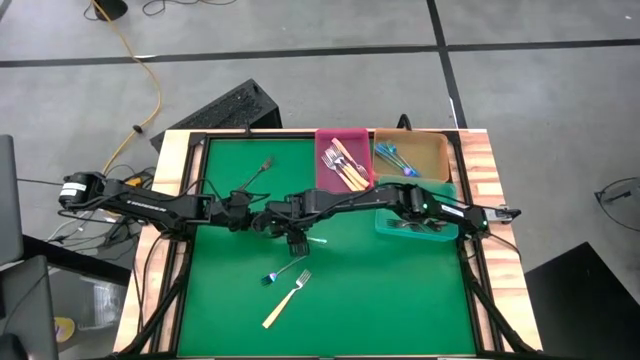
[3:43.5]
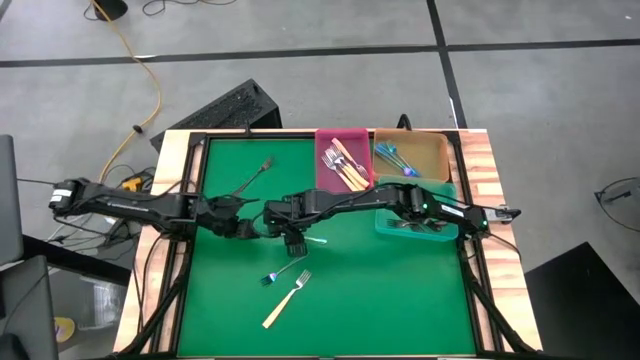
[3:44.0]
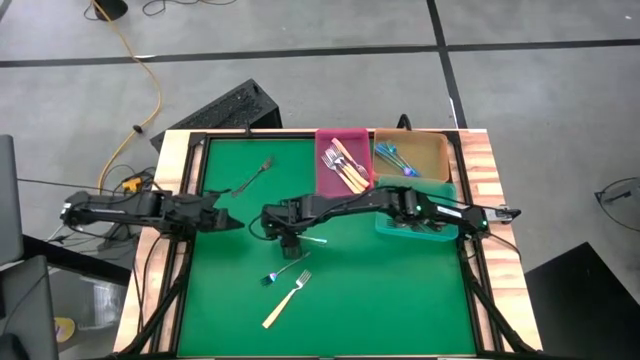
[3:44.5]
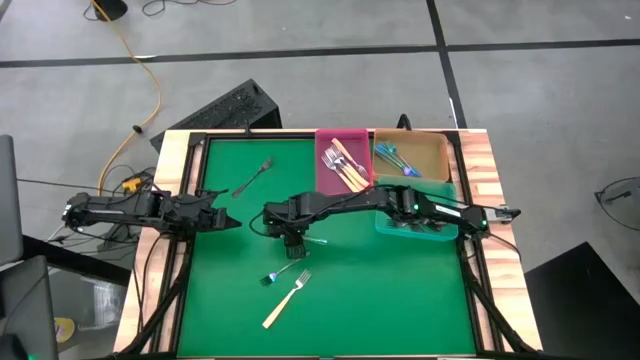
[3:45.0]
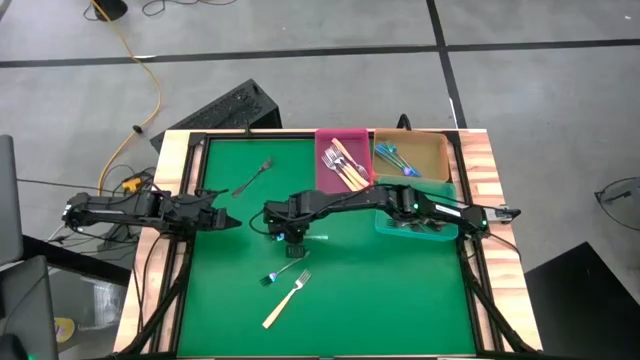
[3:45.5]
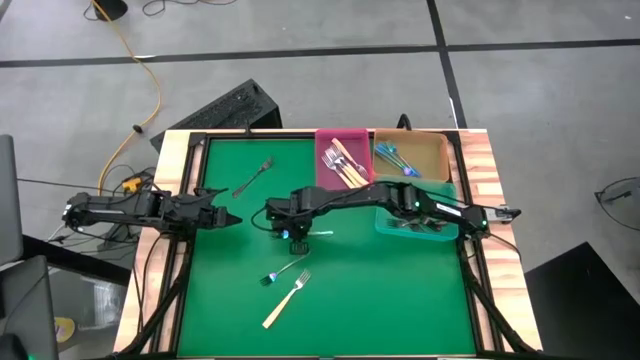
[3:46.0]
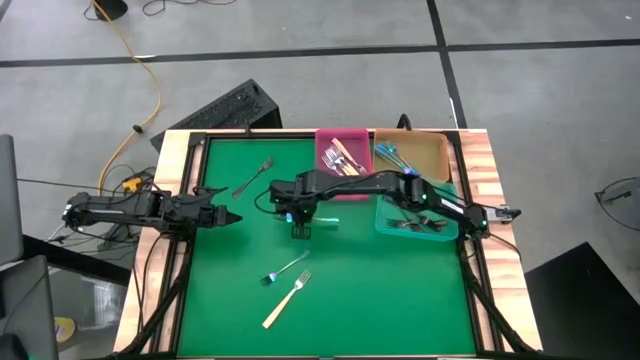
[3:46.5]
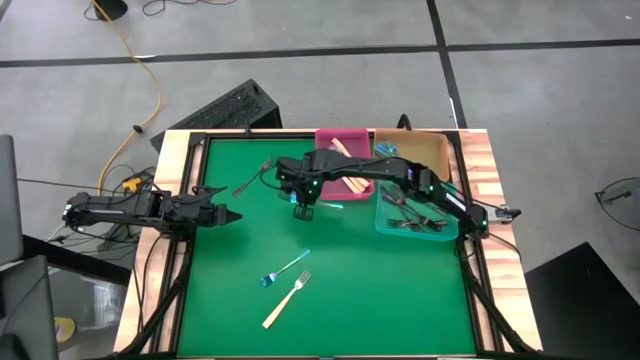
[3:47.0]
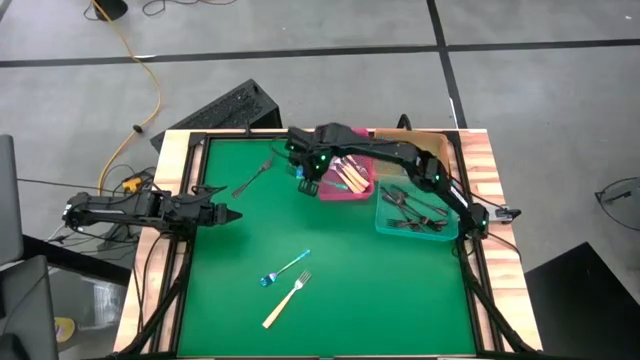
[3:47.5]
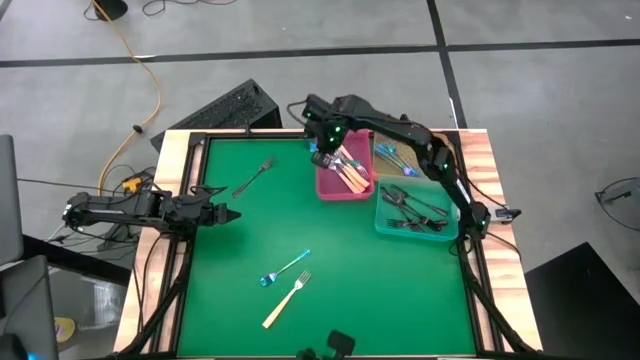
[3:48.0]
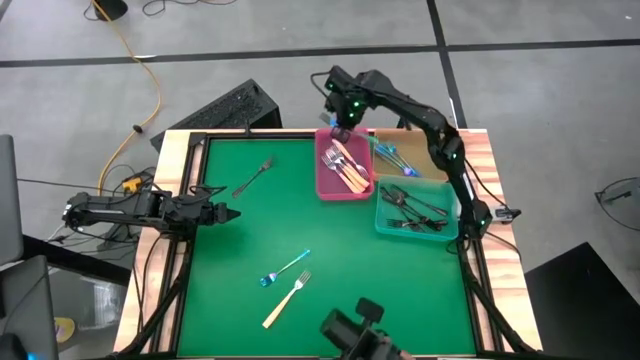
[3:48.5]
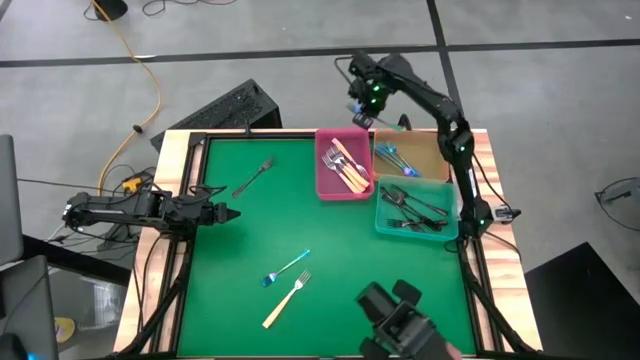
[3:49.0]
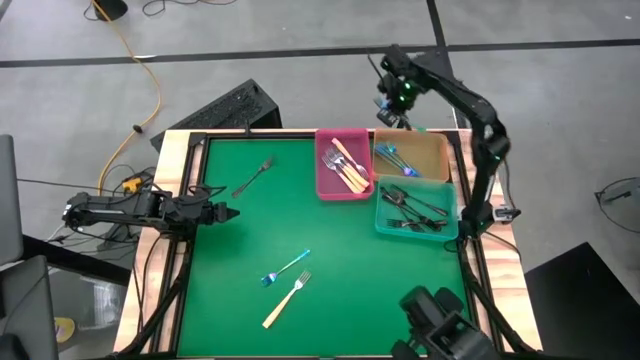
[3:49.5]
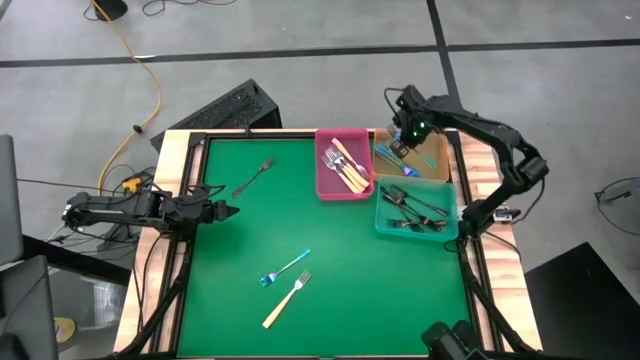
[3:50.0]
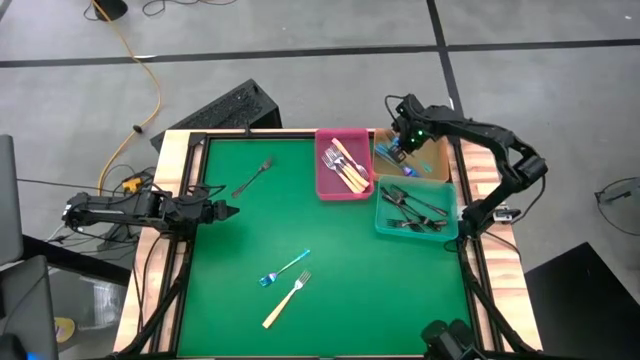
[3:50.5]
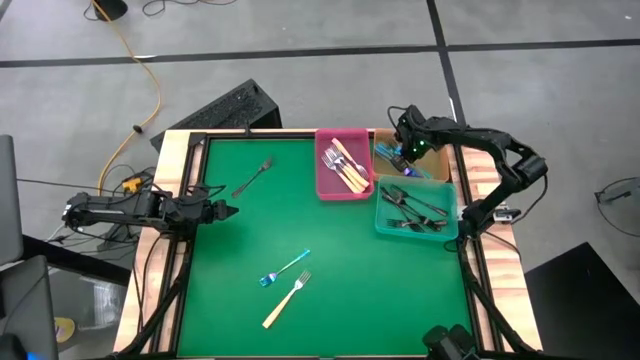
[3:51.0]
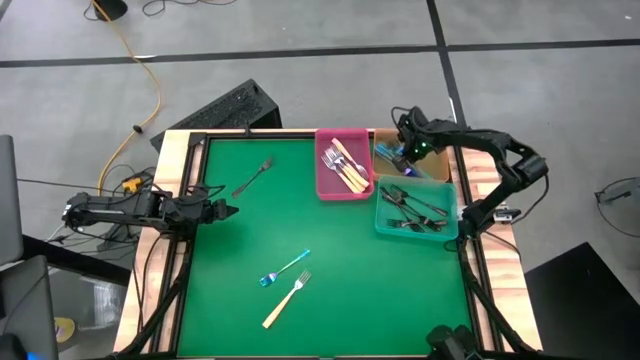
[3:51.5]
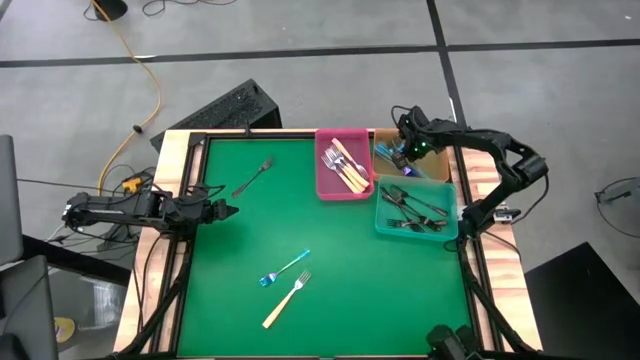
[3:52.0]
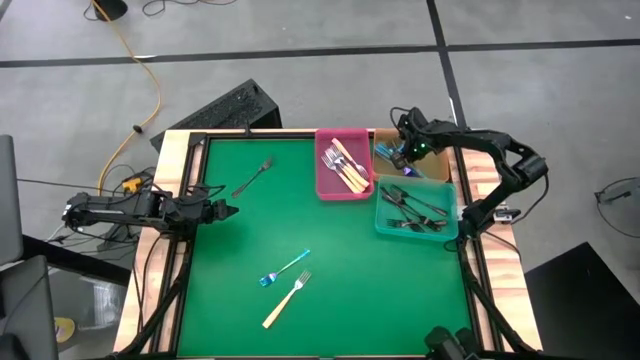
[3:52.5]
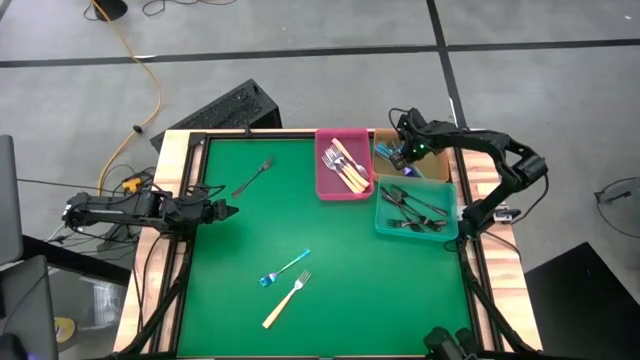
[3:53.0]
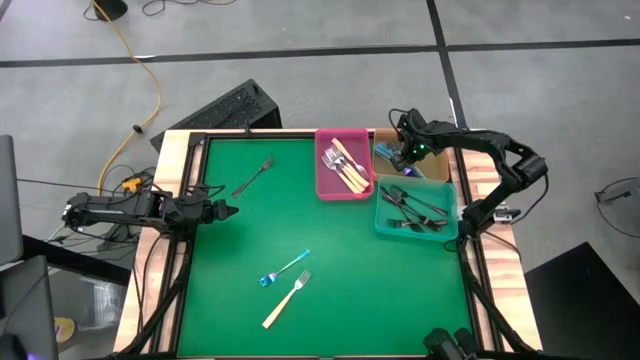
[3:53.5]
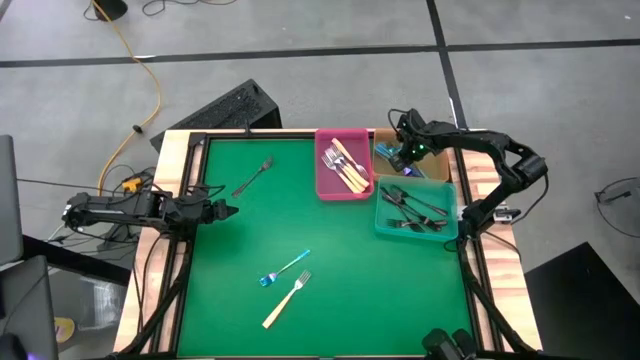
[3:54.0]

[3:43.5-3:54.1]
Task: Sort silverware by color (type)
Put the blue fork into the orange bin

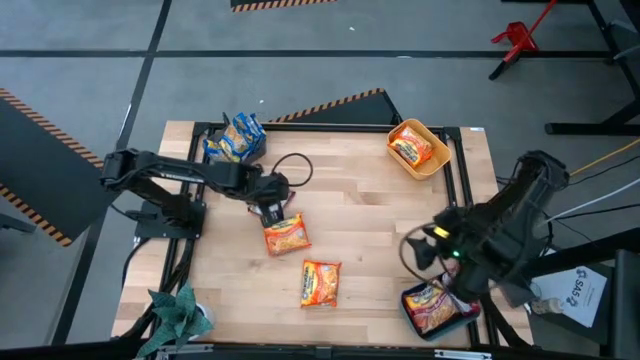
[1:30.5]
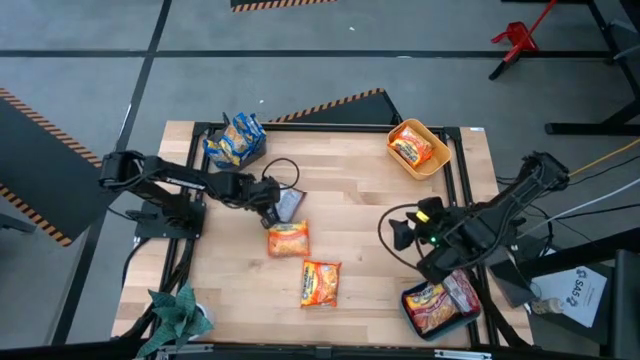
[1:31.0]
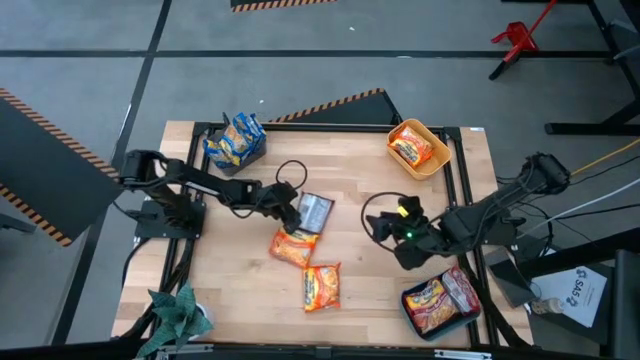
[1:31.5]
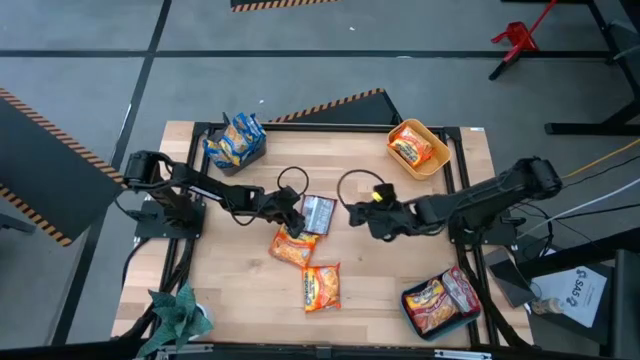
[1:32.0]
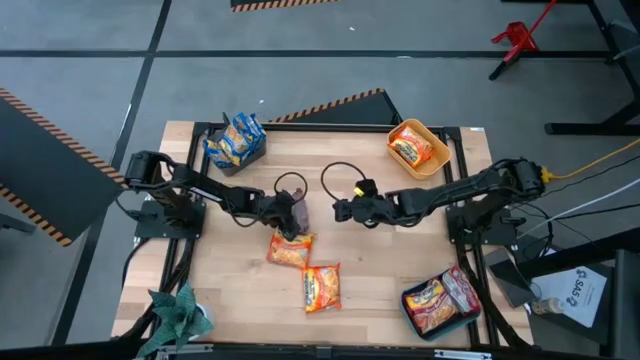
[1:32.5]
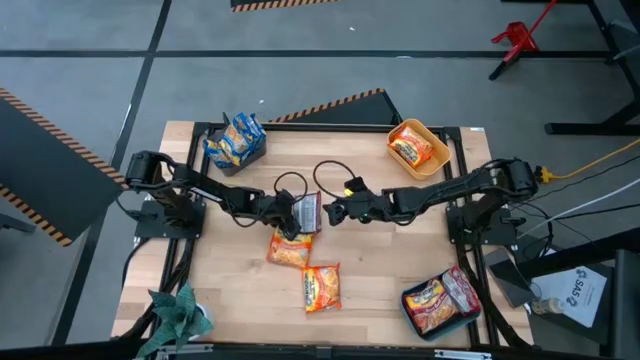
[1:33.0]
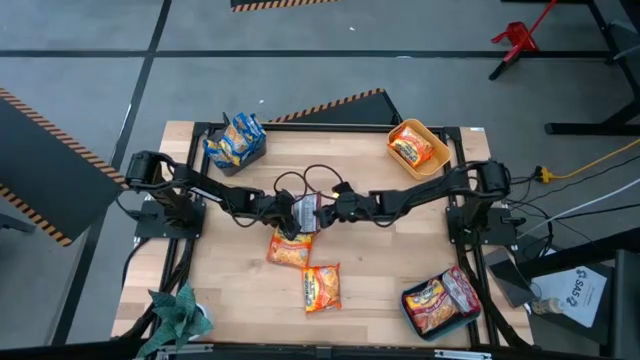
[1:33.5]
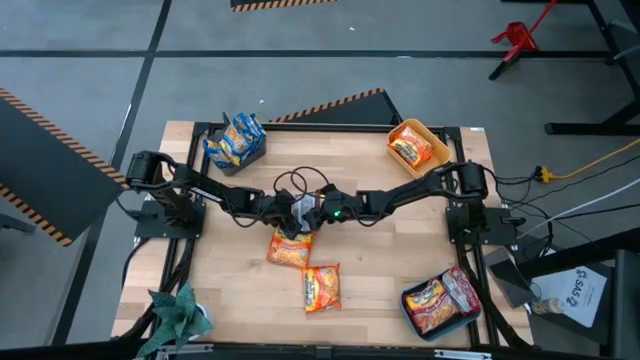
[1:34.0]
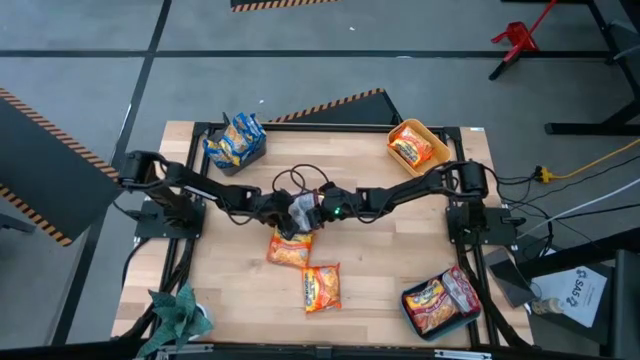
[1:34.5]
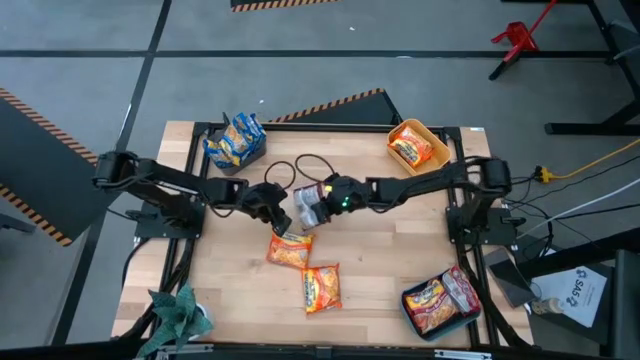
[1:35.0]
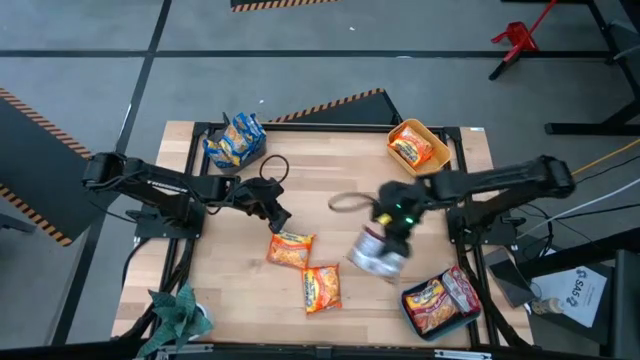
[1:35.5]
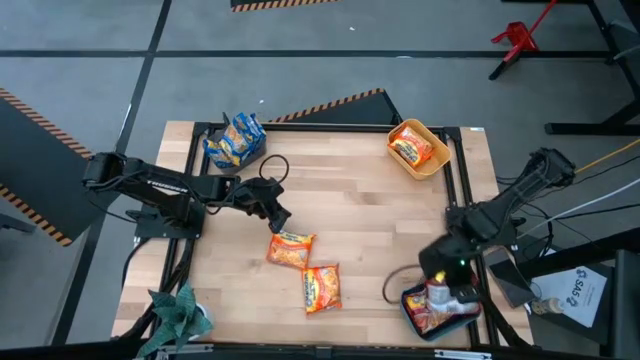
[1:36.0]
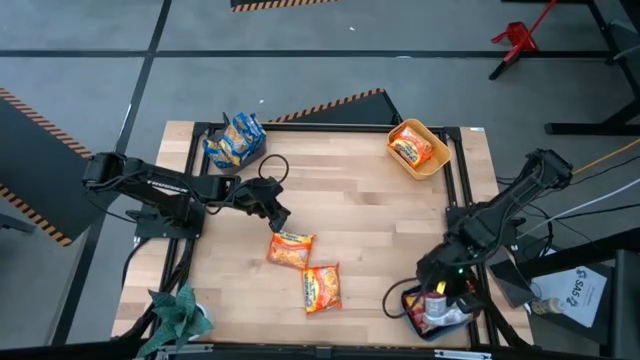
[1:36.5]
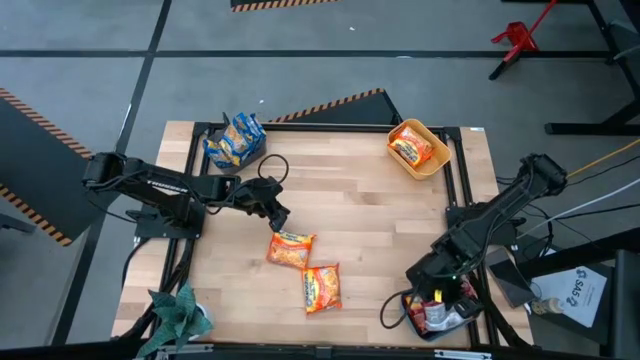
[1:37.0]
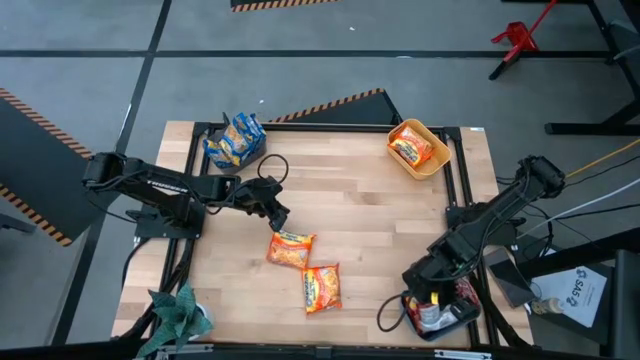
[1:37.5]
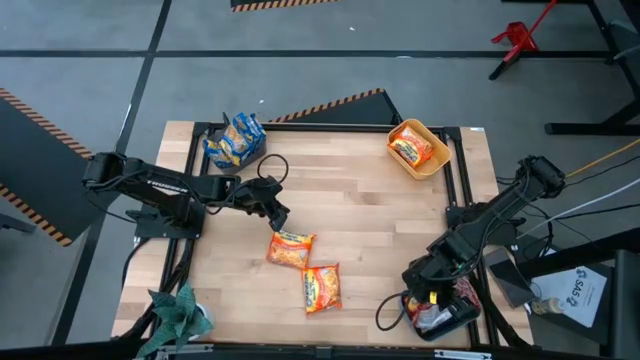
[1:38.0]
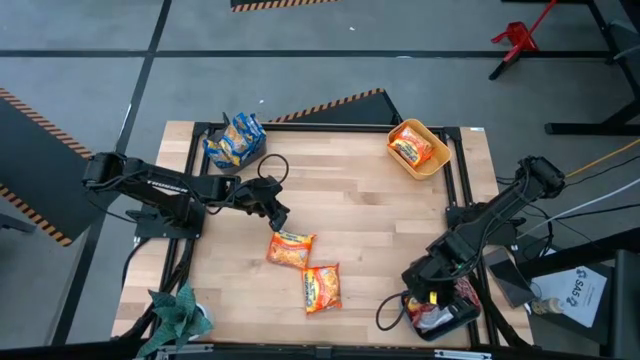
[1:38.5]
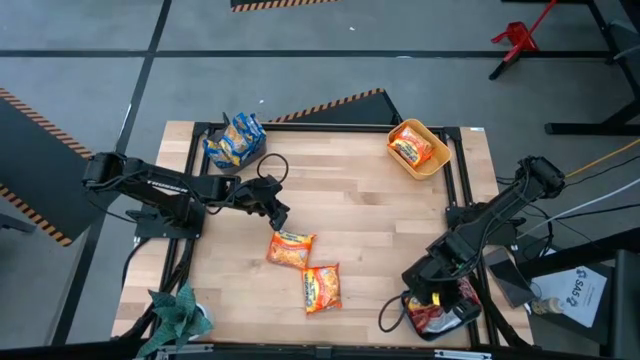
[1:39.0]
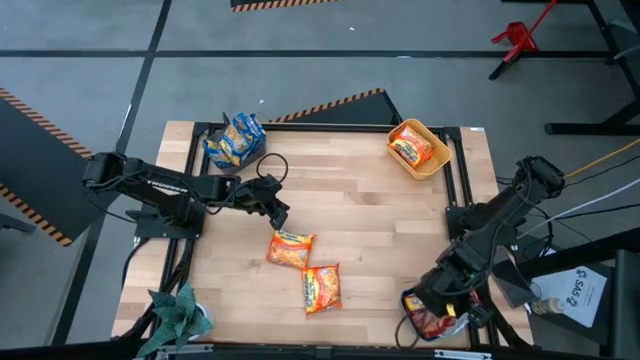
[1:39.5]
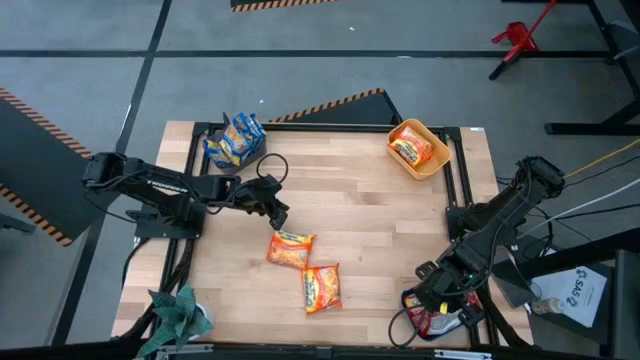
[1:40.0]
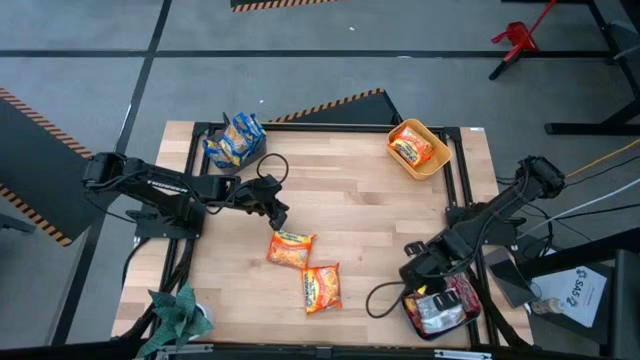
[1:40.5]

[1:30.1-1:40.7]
Task: Sort Maruchan noodles
Put the red noodle pack into the blue bin
